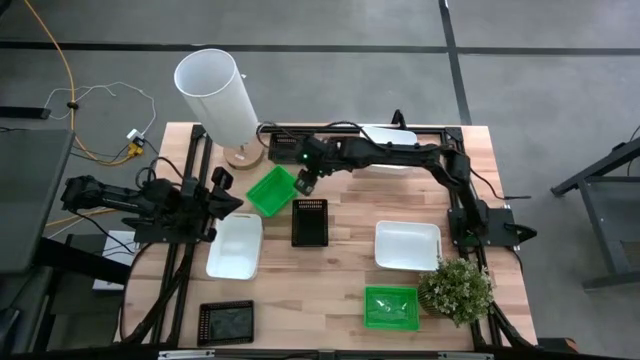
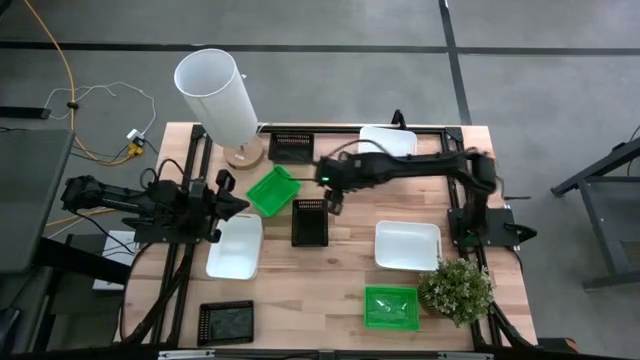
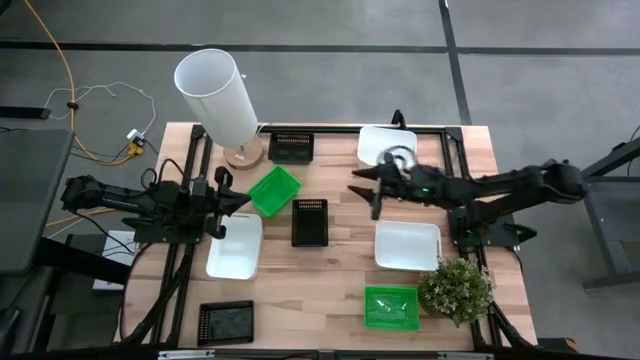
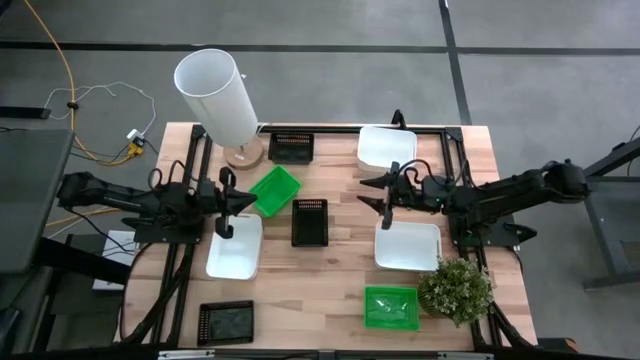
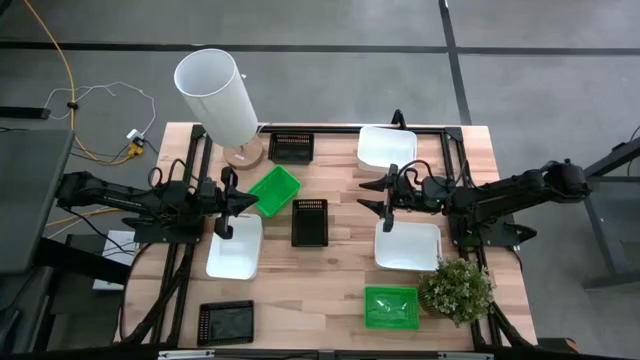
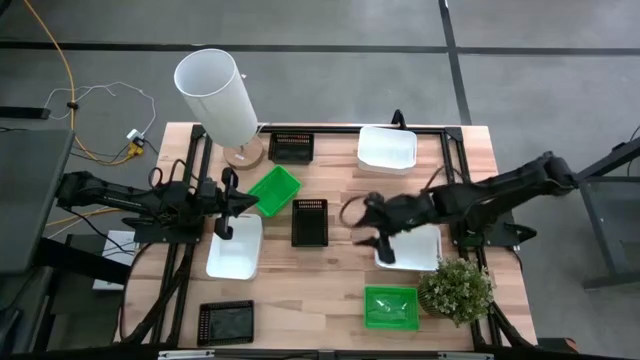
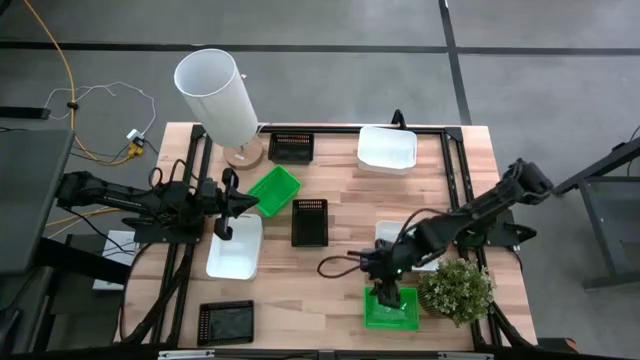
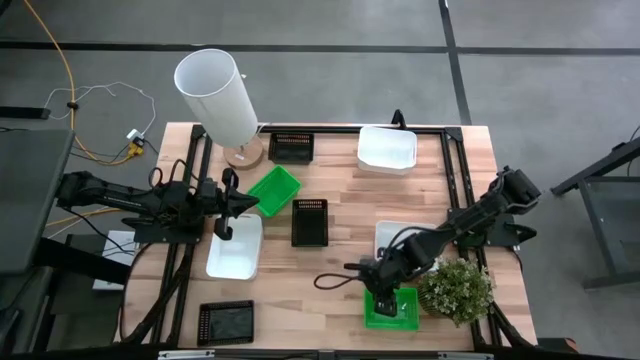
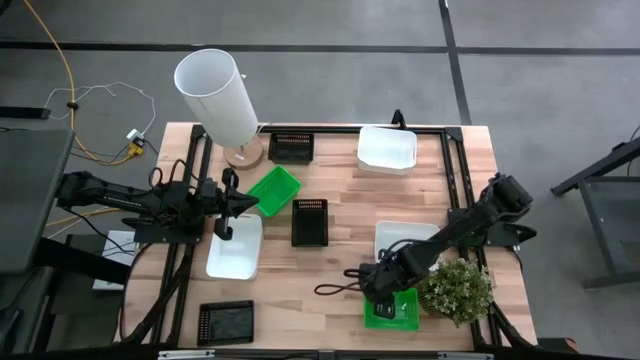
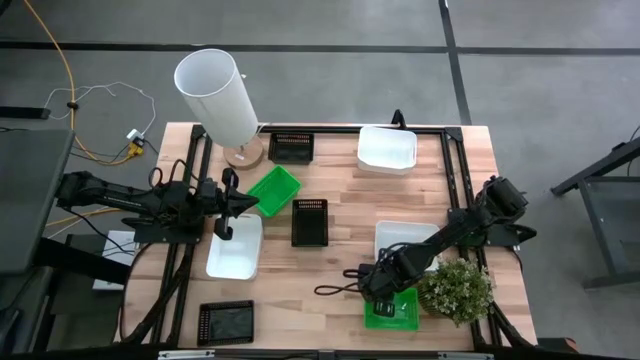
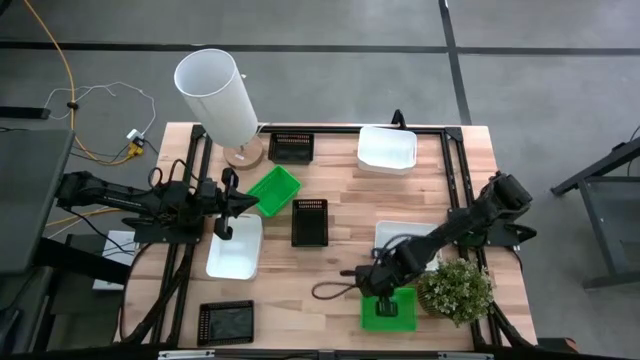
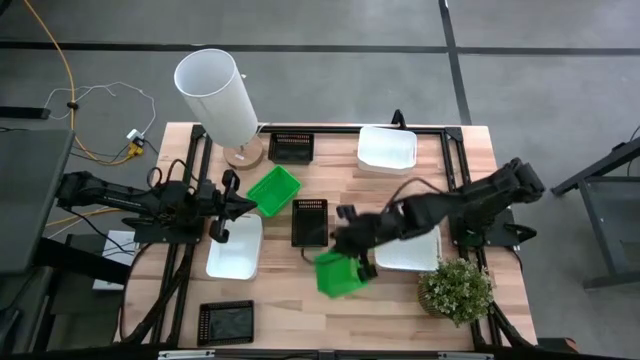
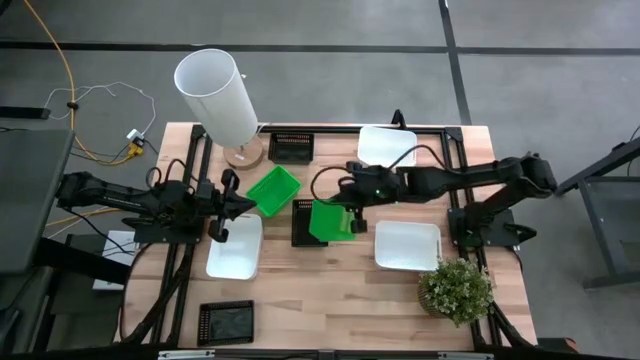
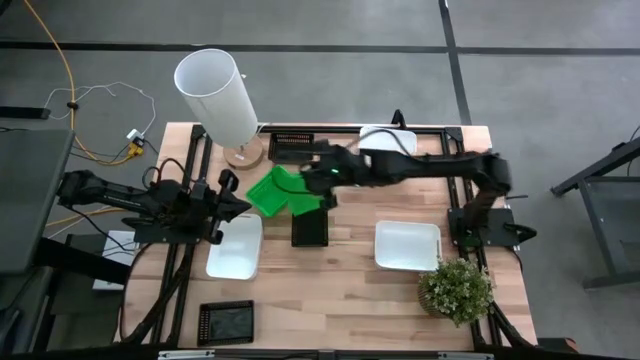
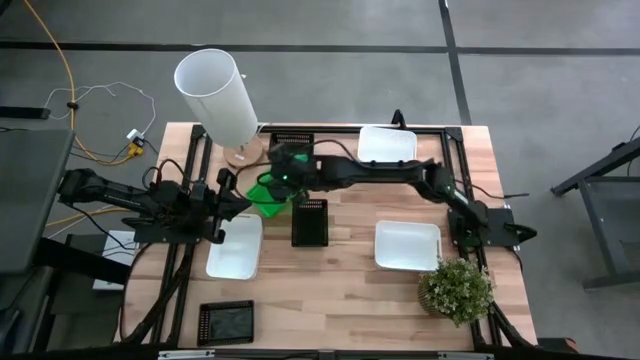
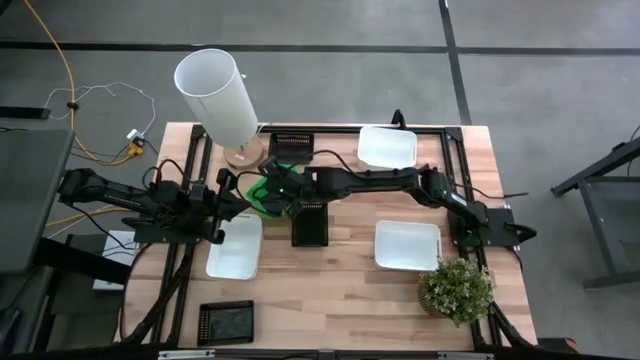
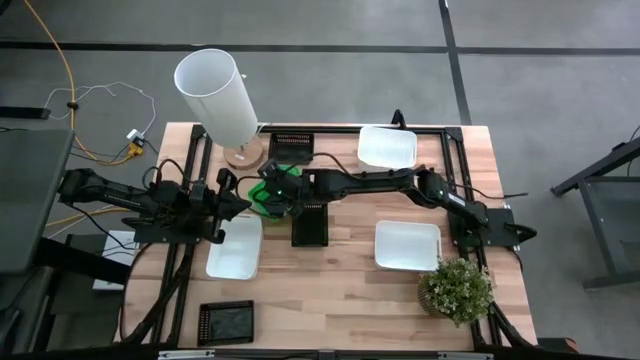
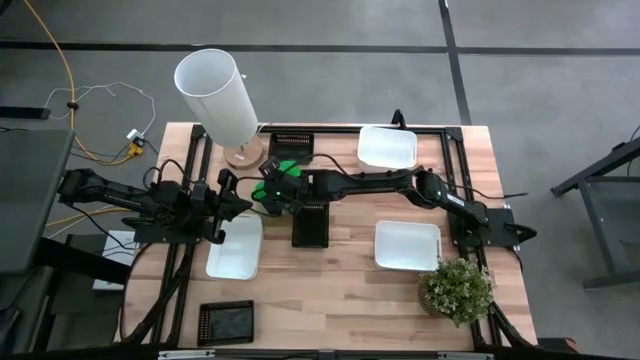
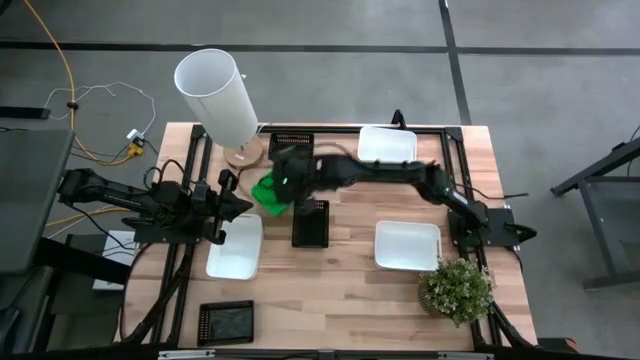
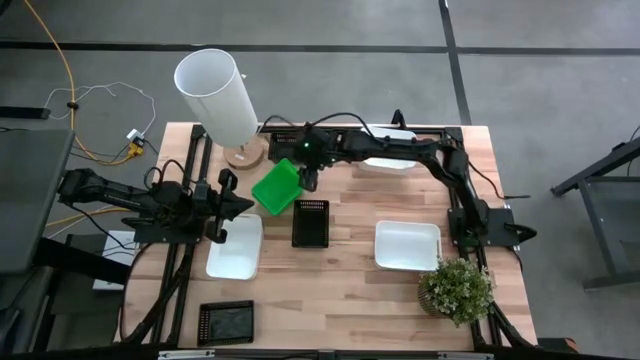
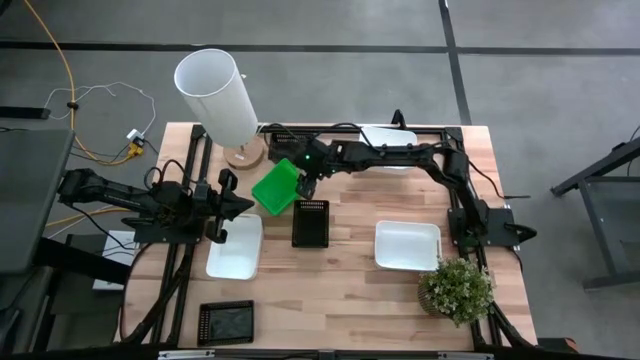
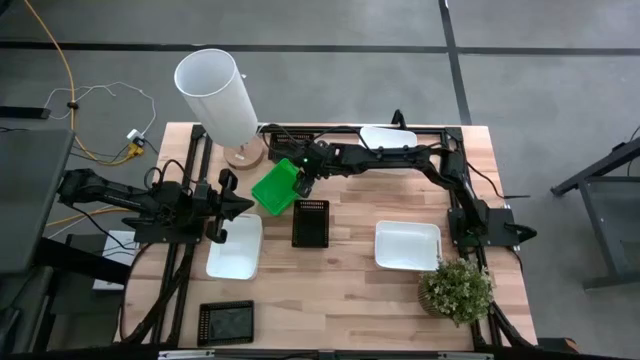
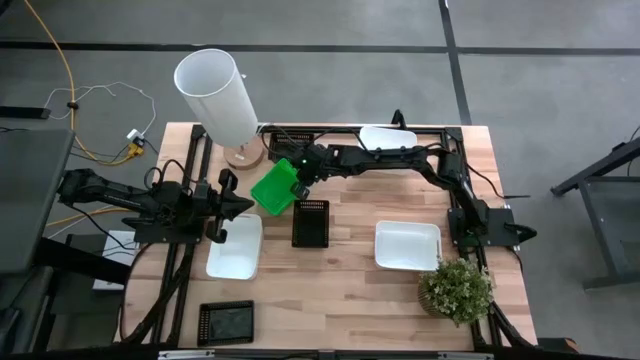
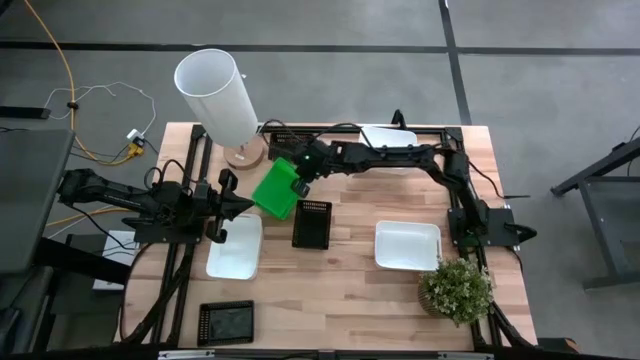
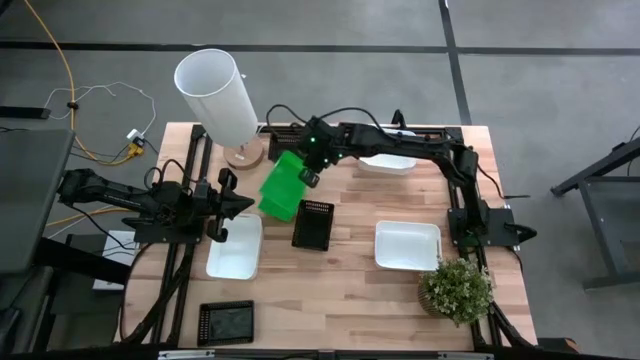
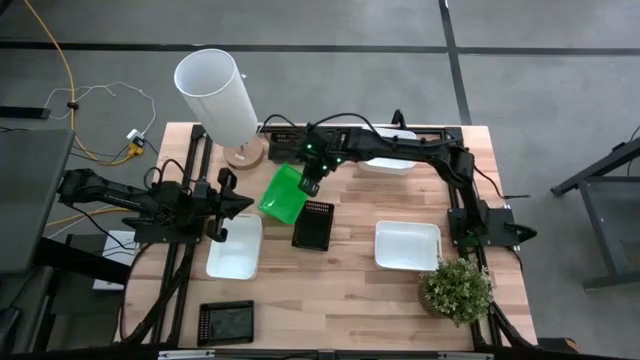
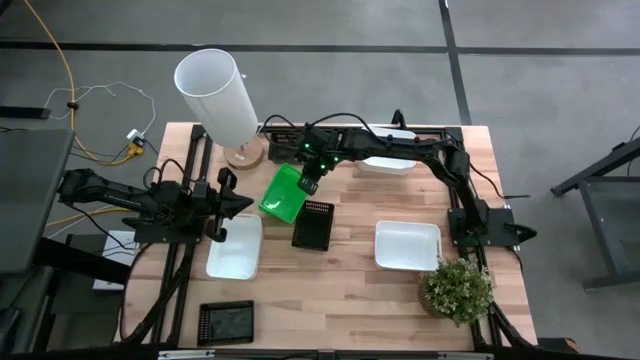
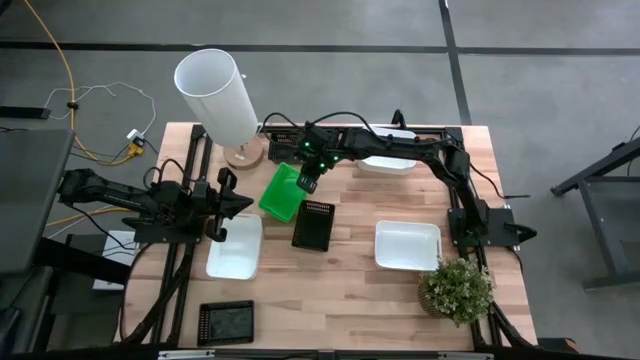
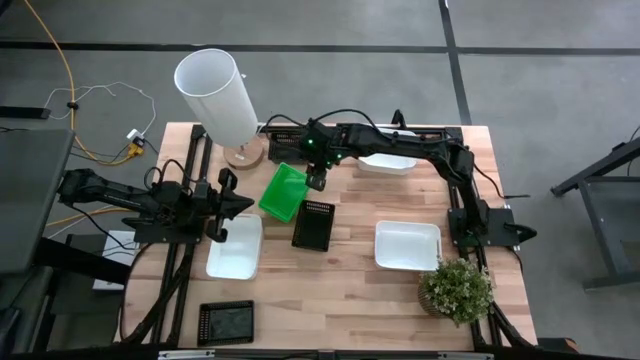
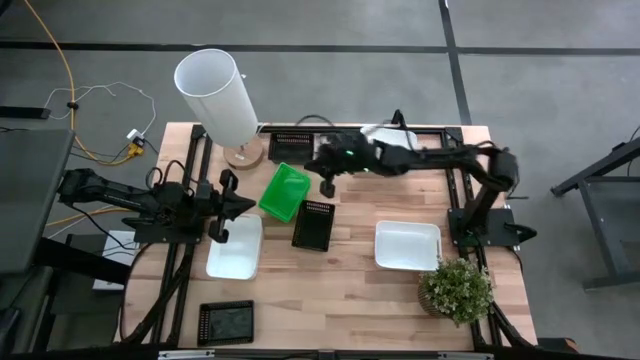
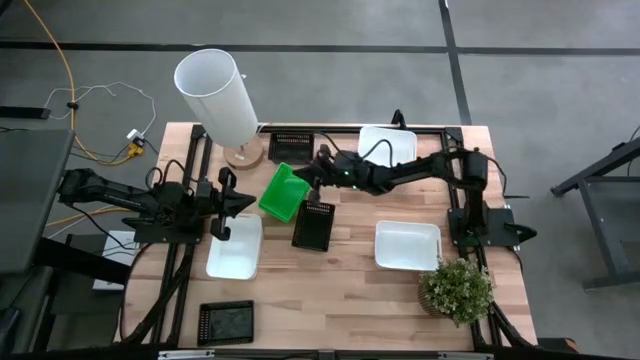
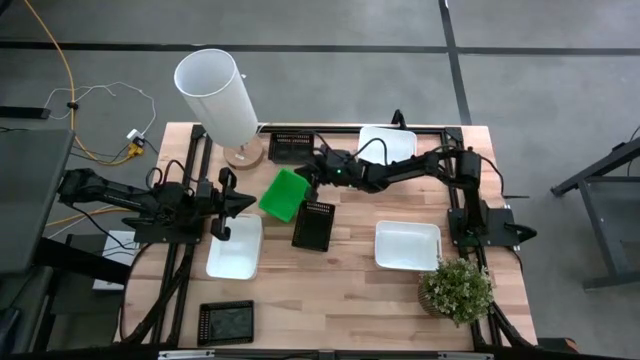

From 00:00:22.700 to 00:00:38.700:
Stack the bottom green bin on the top green bin
